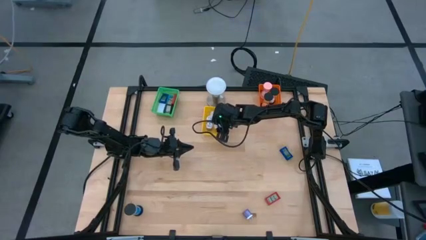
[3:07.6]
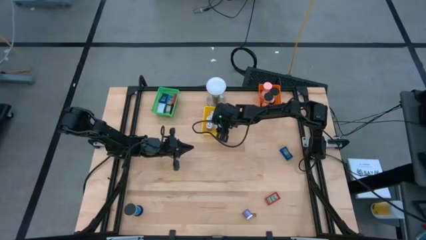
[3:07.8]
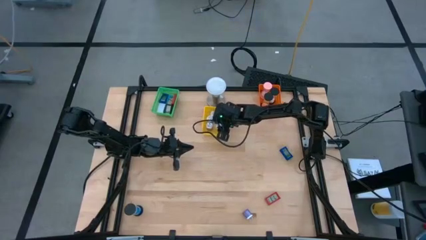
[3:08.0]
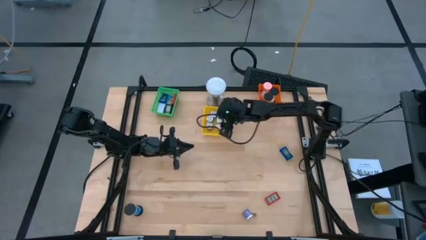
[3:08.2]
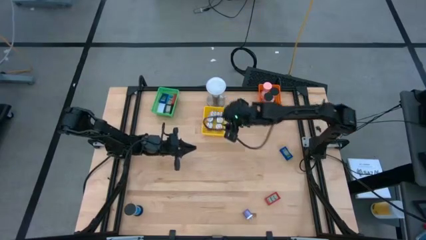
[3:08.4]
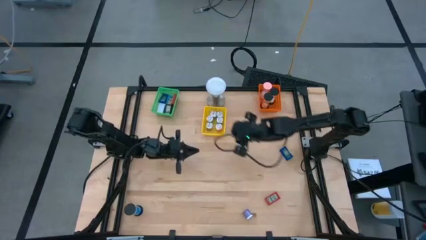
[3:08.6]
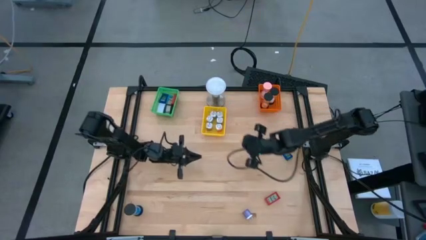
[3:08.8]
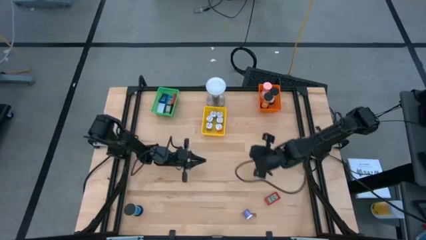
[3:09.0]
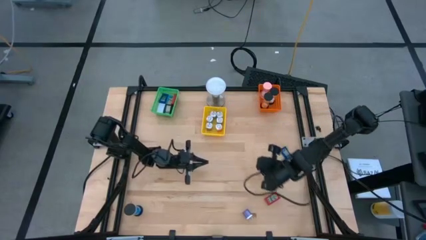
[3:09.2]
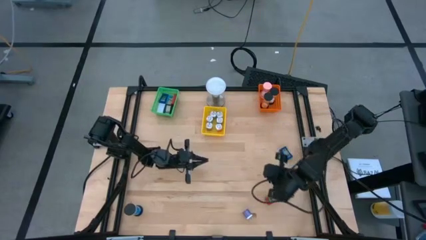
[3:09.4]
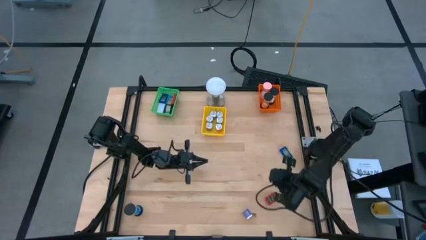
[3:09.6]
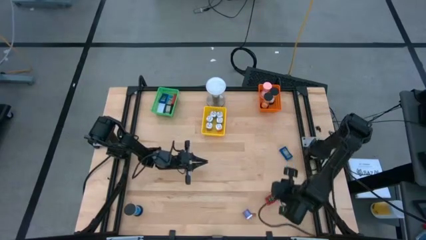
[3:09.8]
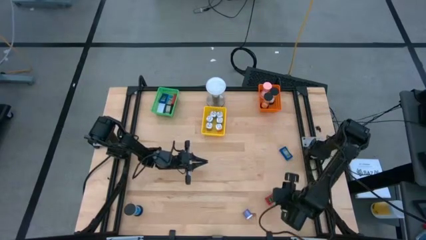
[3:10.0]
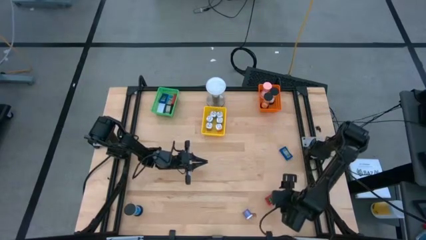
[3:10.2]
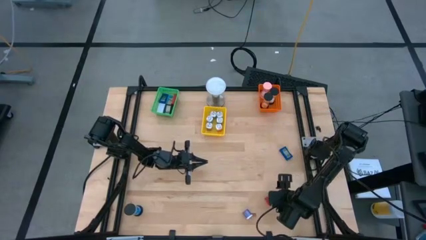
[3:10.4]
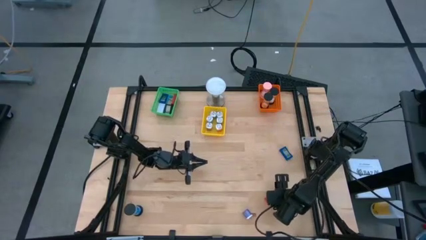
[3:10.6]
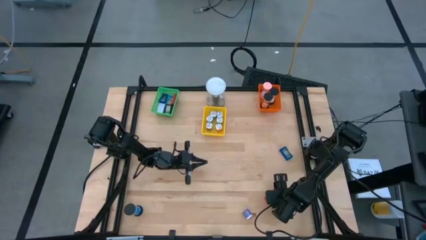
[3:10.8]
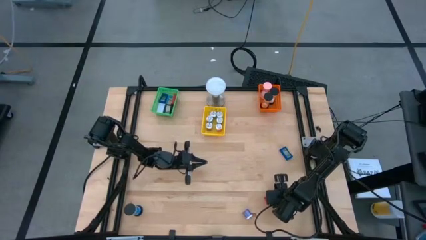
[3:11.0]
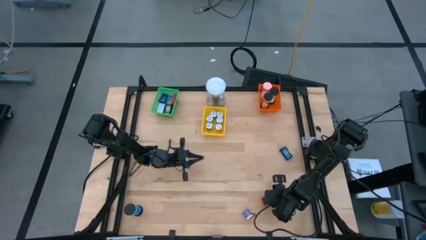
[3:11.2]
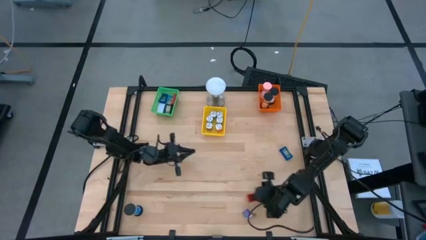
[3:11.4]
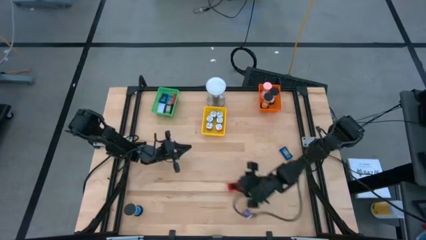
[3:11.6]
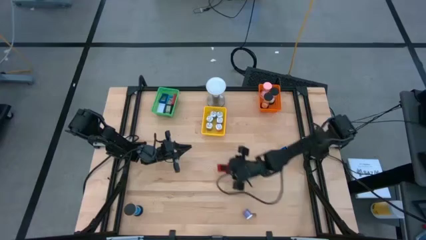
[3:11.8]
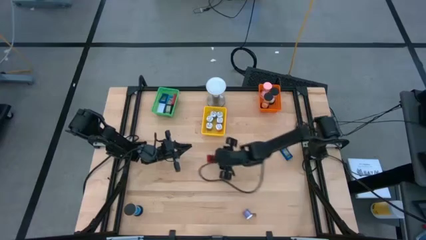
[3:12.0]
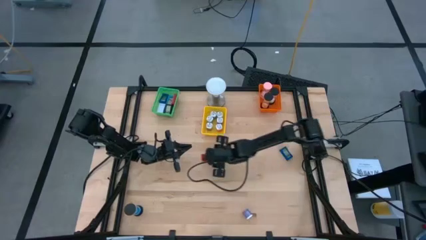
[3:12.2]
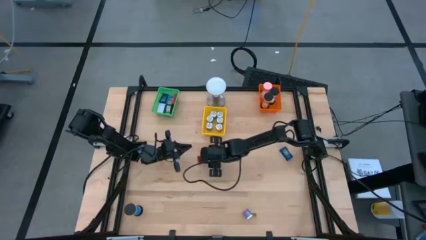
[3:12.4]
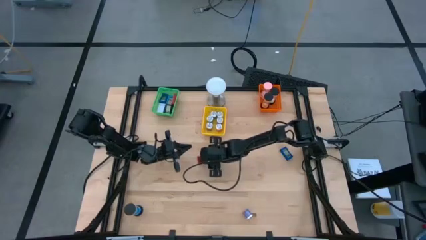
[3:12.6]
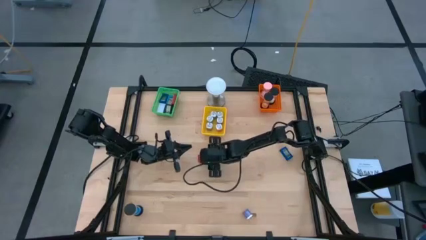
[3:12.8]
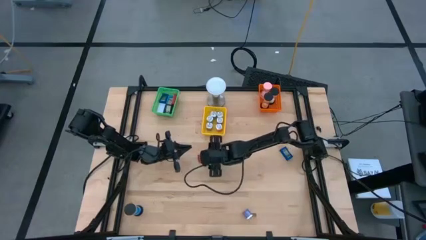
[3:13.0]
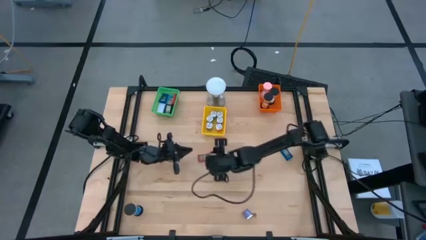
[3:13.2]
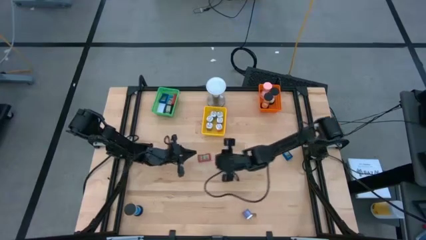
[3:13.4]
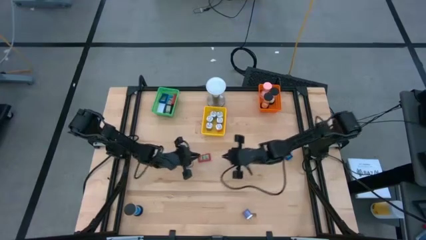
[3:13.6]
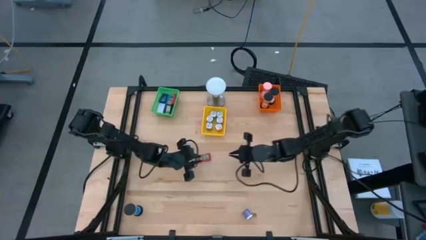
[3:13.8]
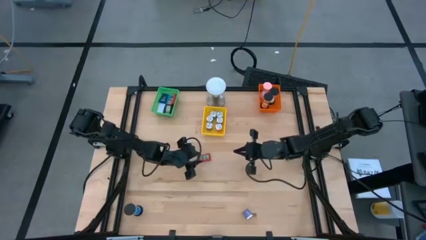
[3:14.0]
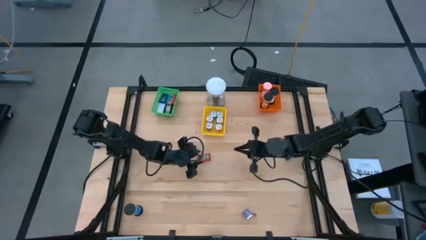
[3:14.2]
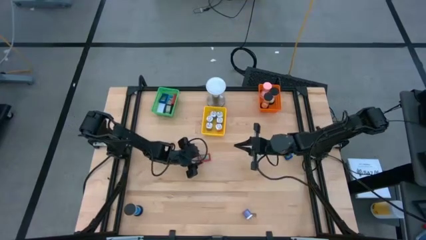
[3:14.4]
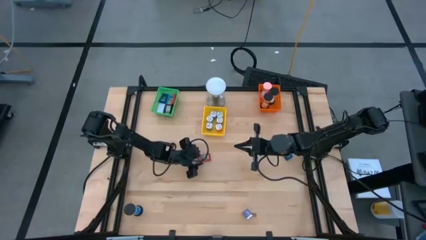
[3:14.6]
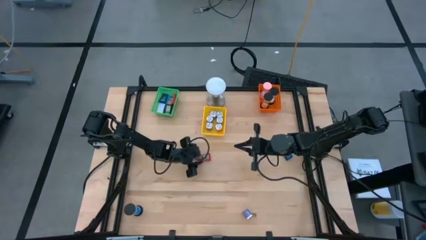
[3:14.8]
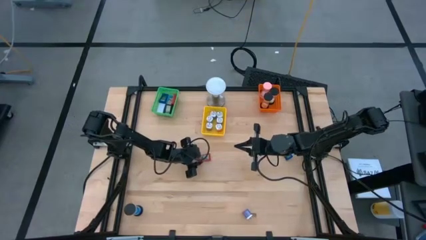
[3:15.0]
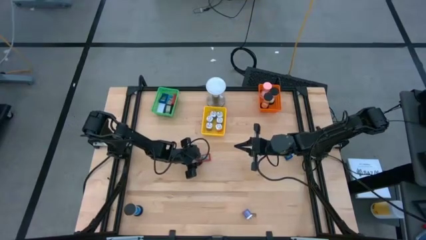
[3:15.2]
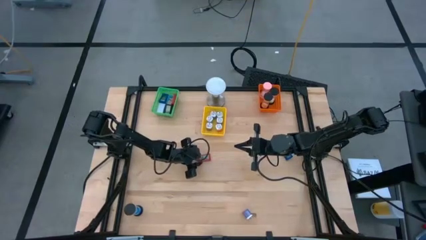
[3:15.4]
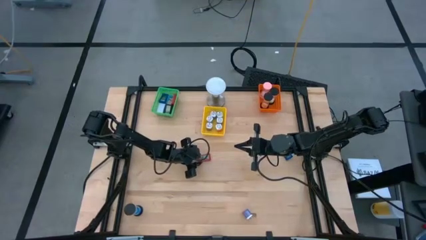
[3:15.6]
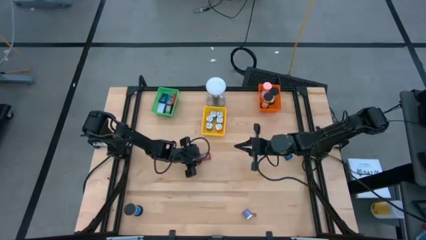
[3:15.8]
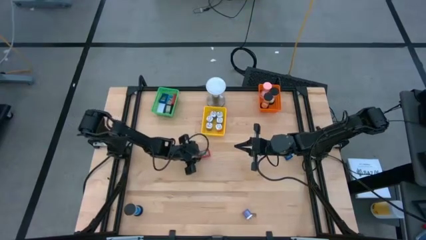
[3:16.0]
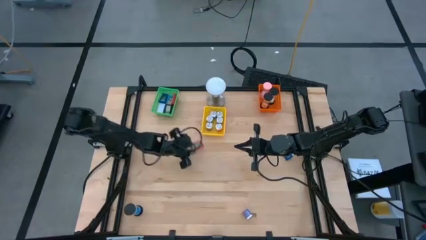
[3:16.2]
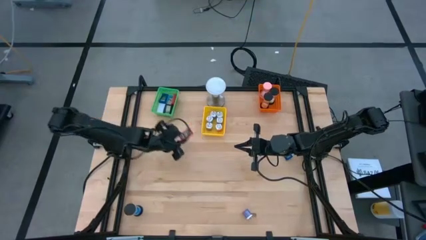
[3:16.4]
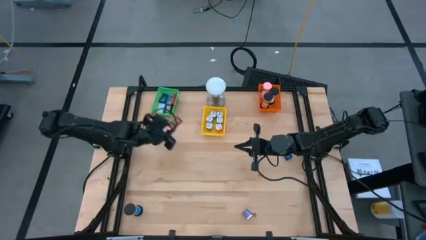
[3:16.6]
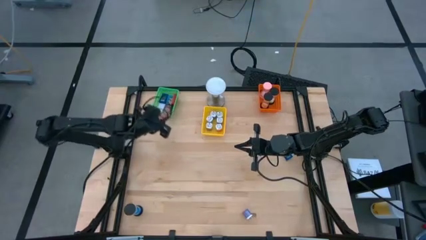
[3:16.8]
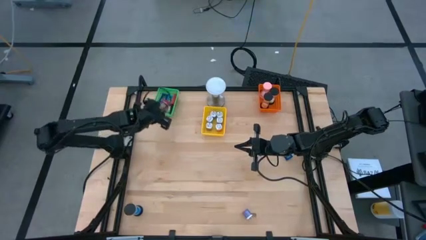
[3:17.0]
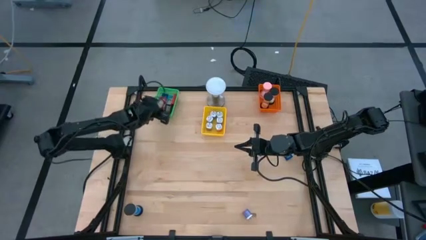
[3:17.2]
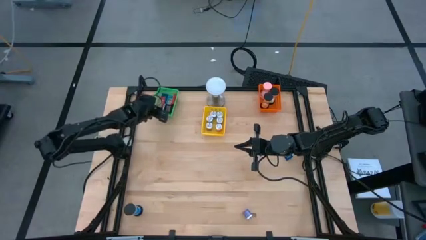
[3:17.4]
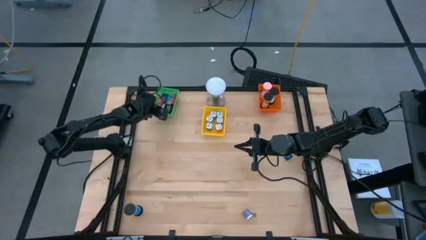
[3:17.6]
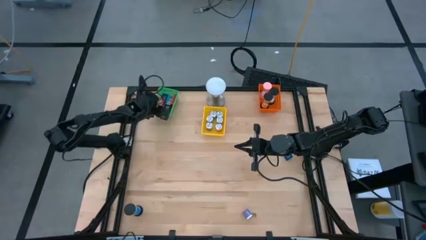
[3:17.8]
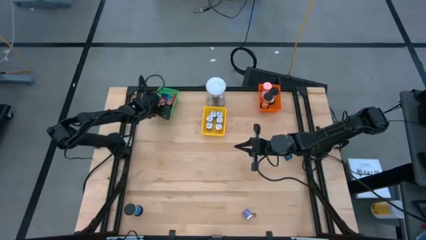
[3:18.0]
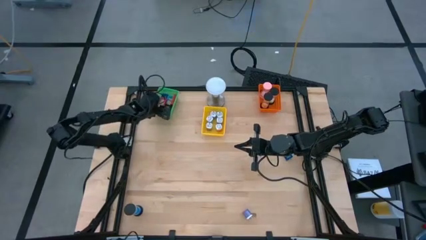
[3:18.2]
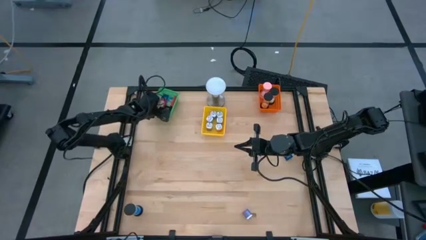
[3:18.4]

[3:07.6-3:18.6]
Task: Pick & Place Office items
Put the red digital clock into the green bin
